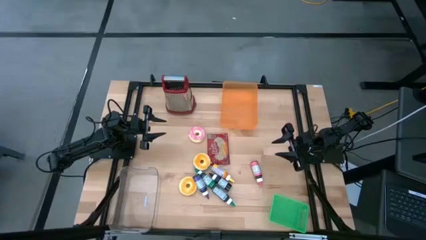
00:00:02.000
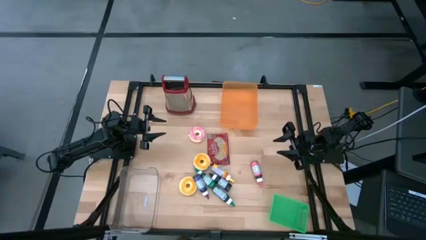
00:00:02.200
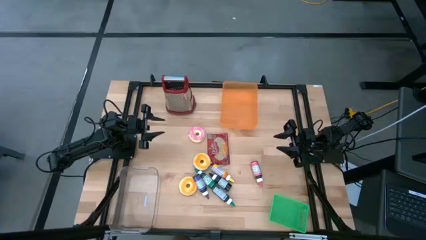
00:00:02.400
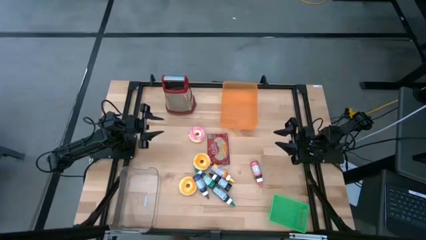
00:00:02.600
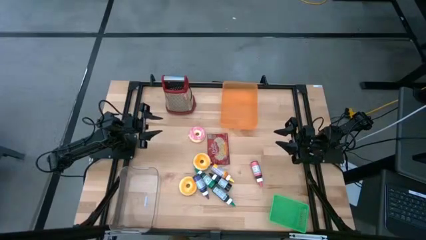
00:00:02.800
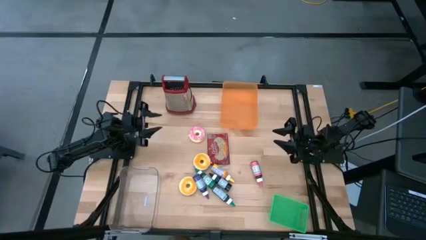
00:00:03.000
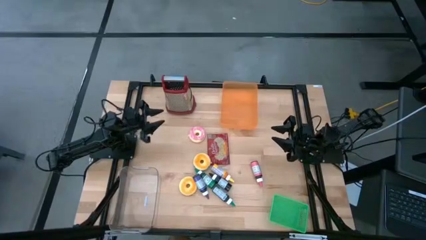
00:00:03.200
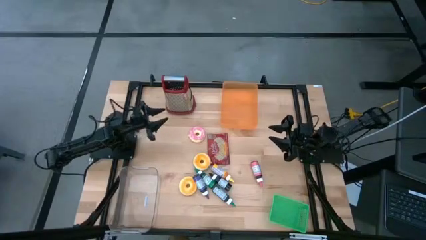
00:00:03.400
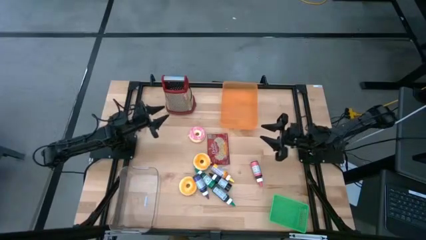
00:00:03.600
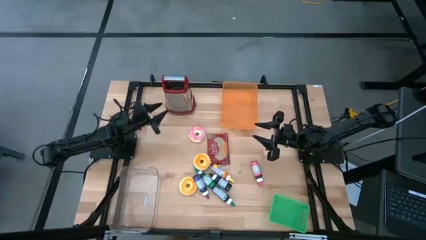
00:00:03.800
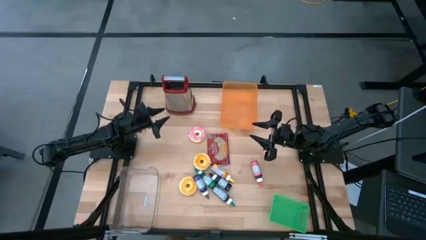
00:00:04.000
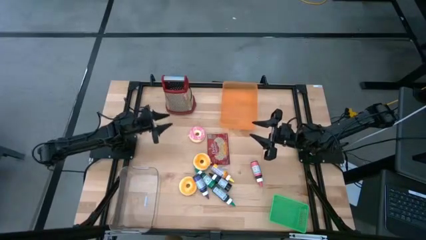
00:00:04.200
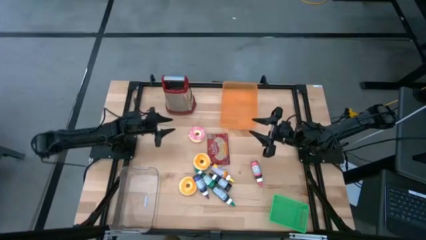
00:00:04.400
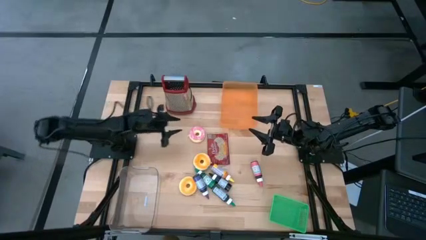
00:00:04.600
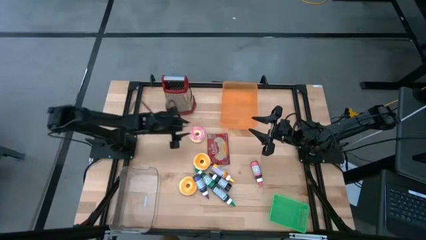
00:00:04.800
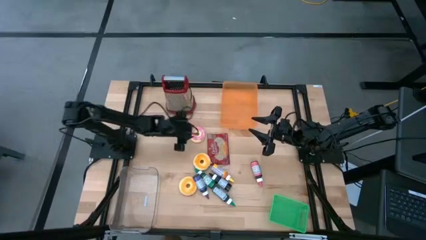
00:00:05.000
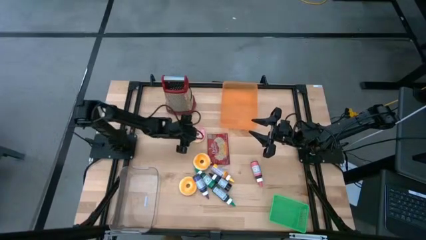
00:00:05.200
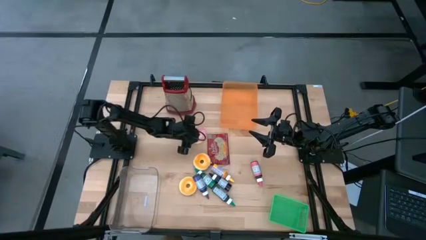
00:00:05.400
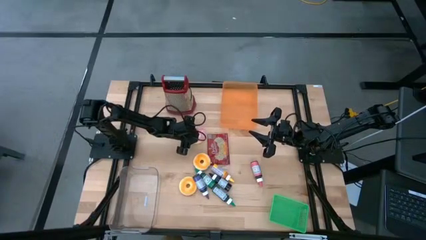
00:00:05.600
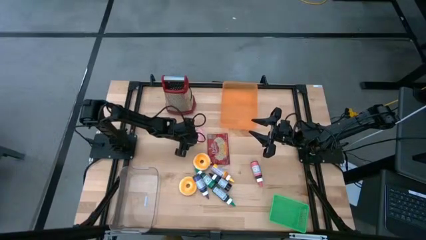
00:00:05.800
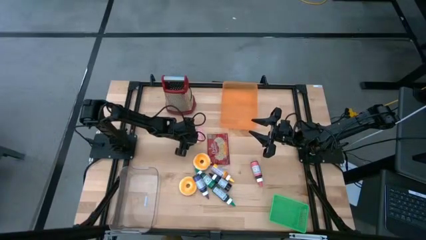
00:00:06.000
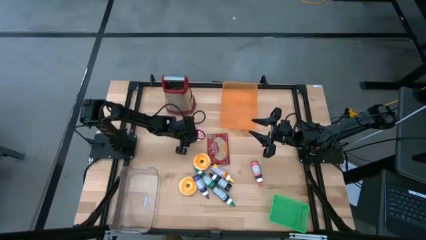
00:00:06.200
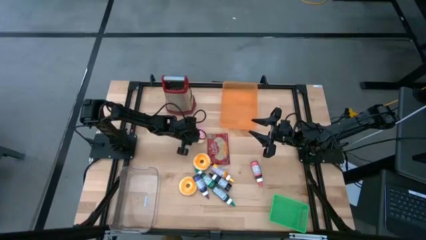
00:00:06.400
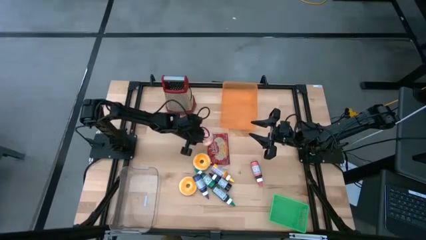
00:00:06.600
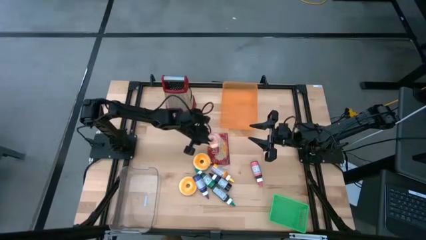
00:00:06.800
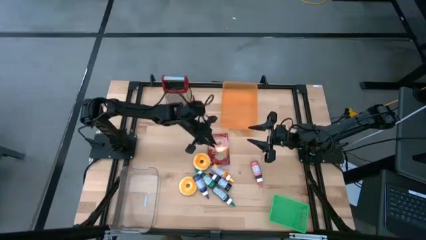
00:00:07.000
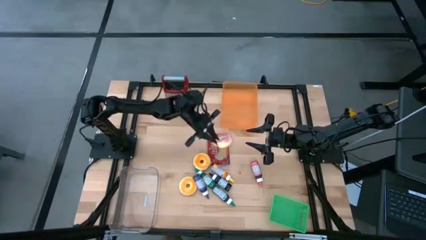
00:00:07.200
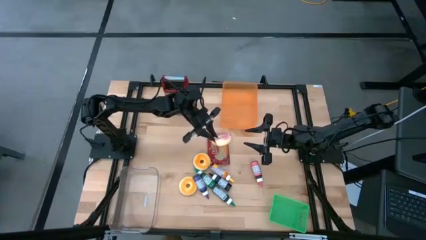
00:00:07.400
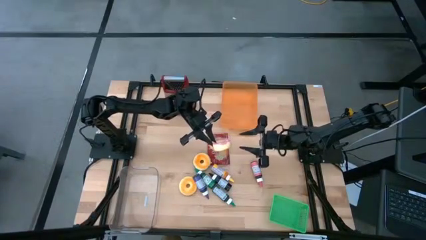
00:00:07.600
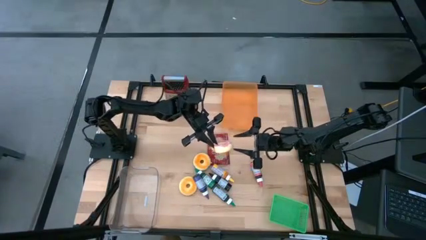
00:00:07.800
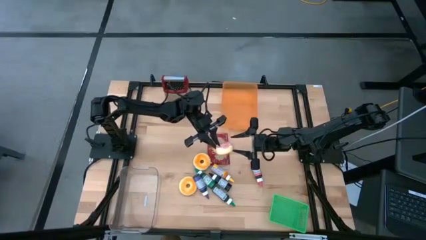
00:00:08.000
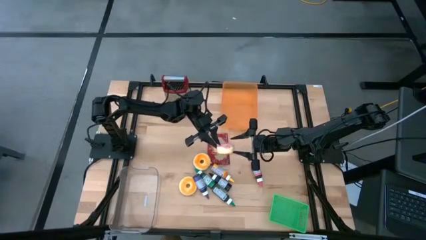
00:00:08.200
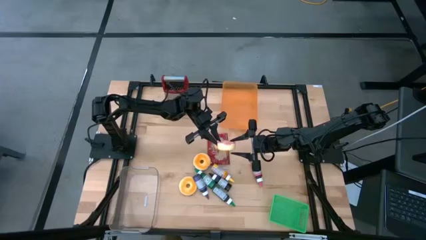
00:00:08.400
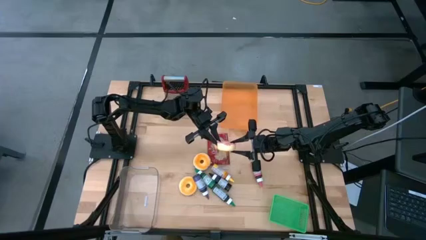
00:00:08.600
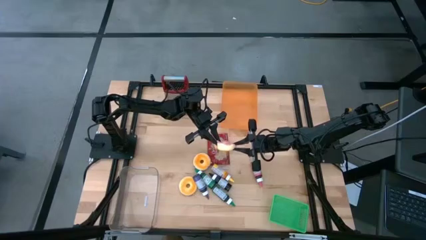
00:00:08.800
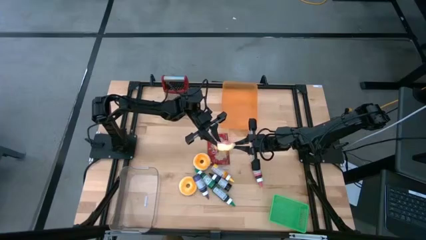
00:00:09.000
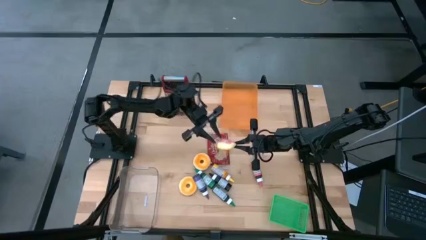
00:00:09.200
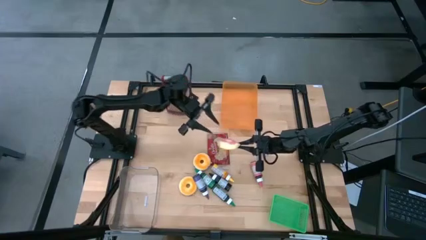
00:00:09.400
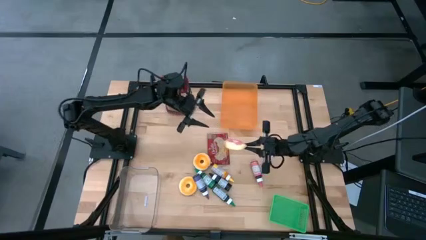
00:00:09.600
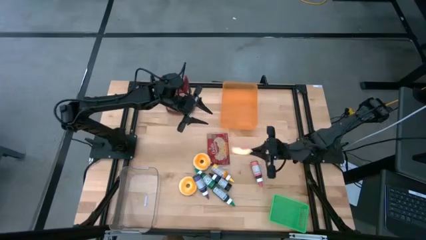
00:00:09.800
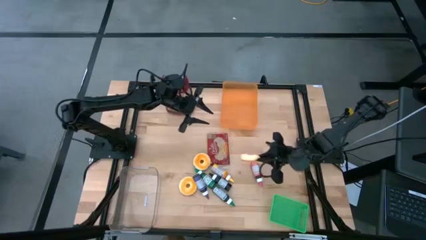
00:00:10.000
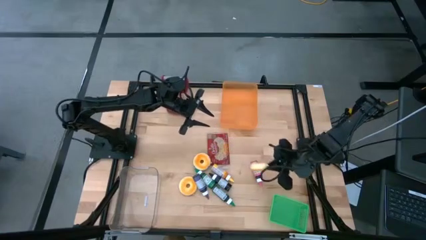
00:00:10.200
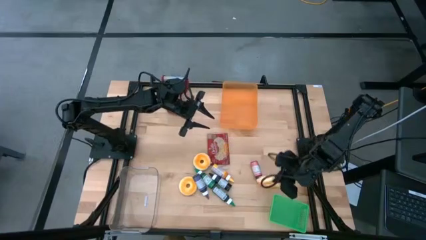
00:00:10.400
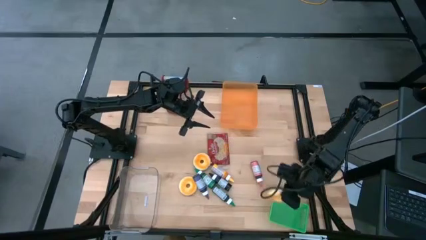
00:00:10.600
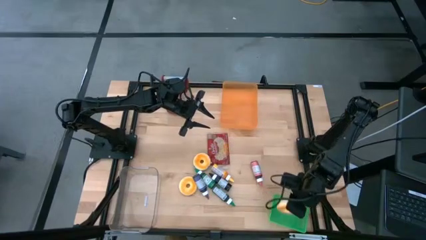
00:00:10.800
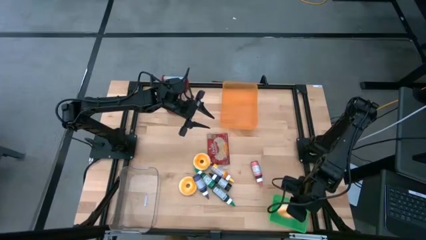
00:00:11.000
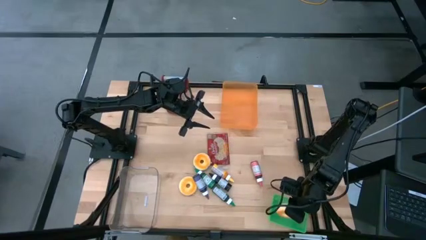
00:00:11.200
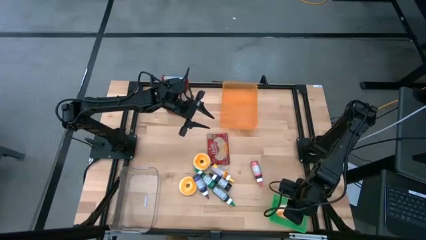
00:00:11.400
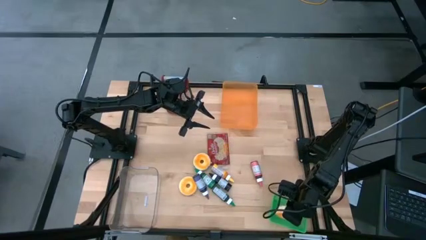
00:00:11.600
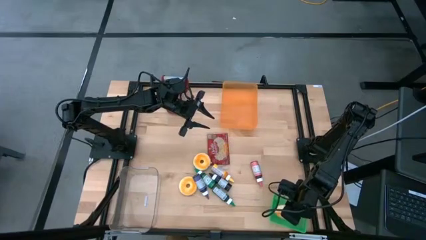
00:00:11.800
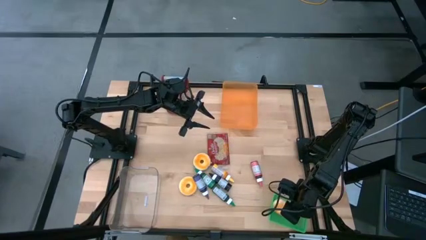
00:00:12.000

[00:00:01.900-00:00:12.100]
Put the pink donut into the green bin

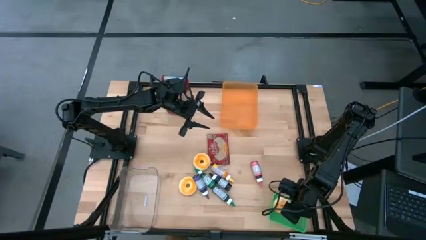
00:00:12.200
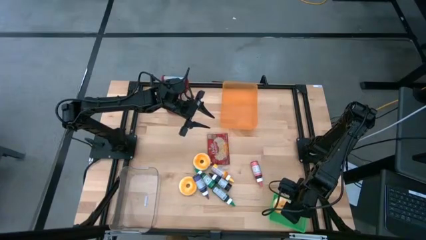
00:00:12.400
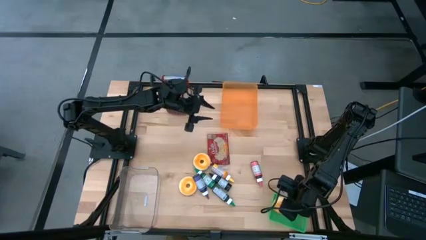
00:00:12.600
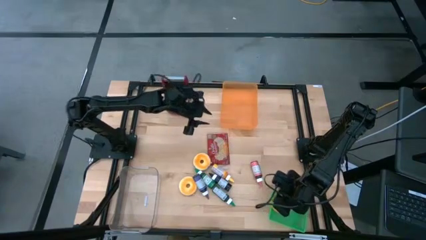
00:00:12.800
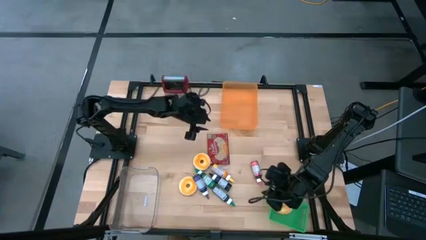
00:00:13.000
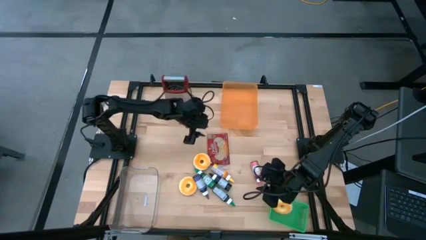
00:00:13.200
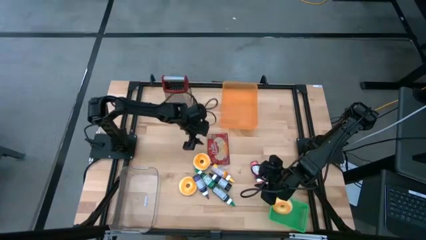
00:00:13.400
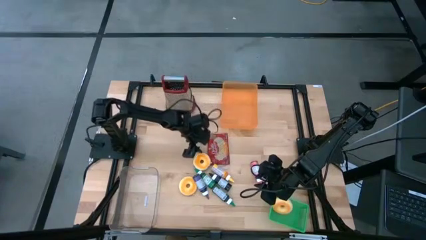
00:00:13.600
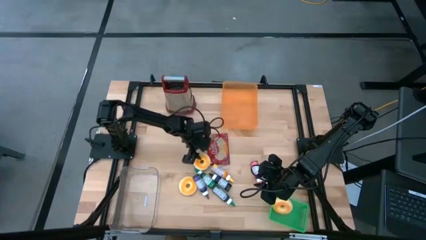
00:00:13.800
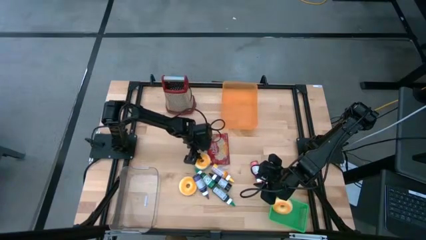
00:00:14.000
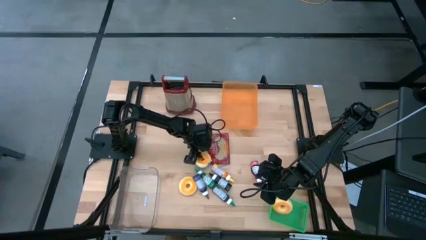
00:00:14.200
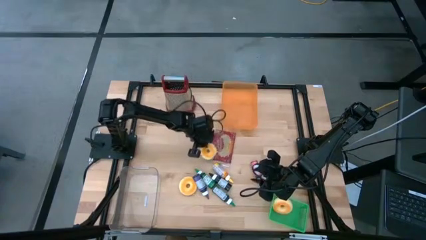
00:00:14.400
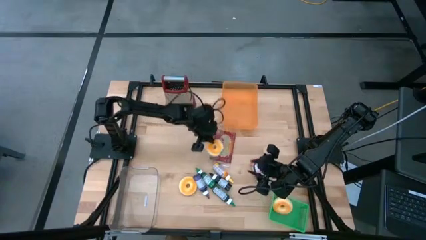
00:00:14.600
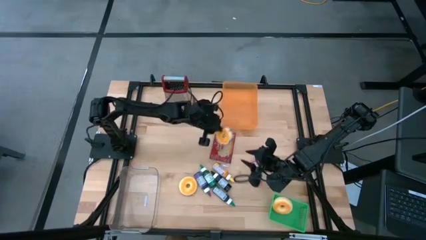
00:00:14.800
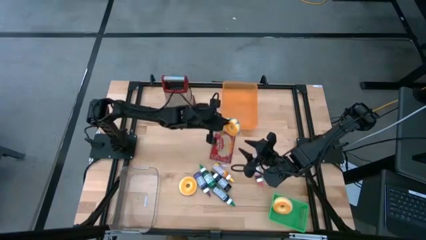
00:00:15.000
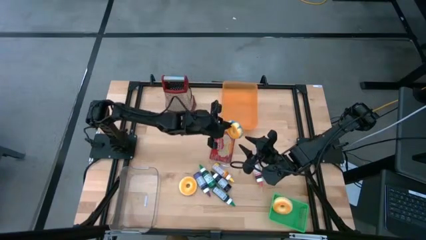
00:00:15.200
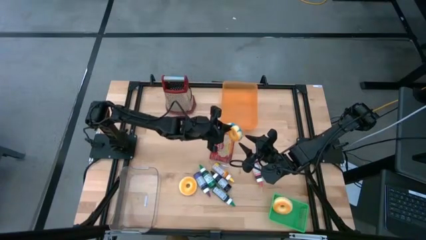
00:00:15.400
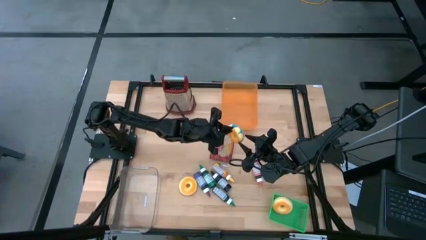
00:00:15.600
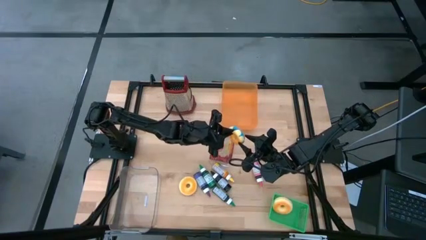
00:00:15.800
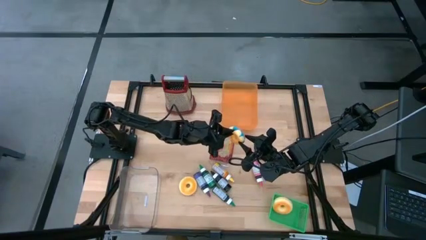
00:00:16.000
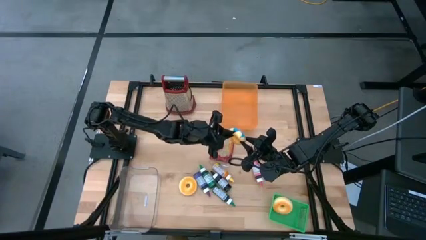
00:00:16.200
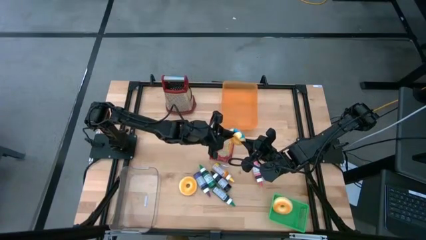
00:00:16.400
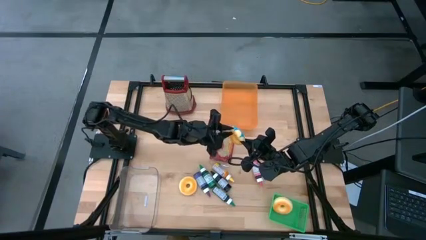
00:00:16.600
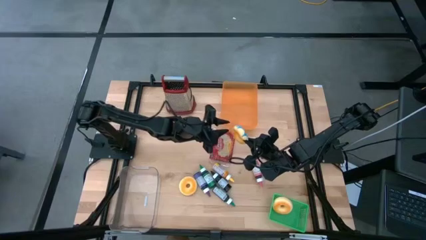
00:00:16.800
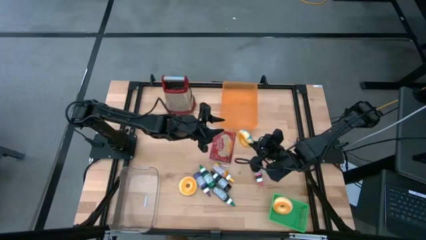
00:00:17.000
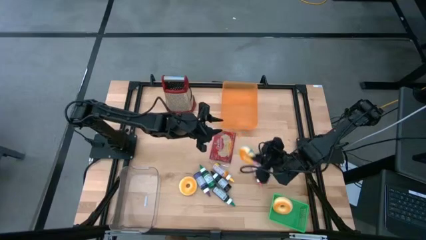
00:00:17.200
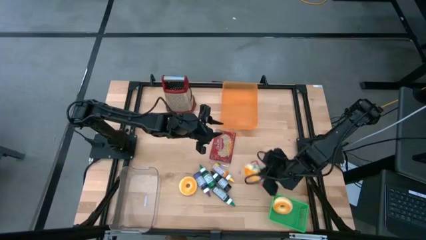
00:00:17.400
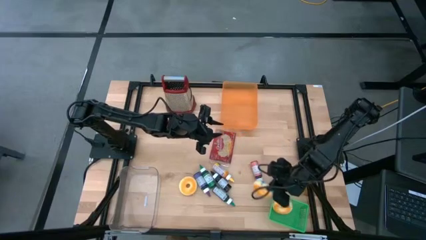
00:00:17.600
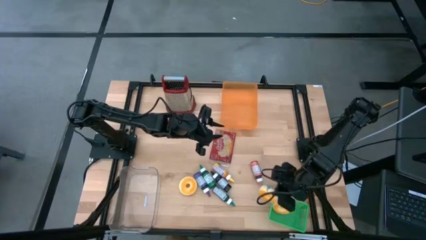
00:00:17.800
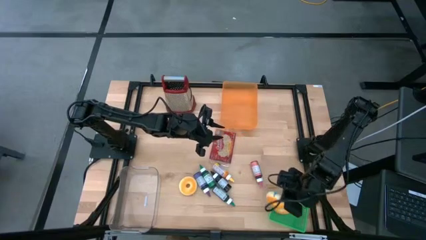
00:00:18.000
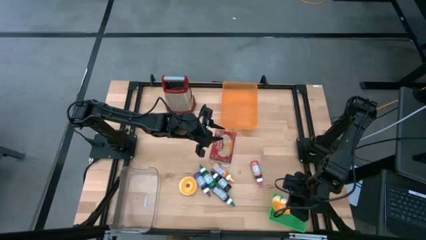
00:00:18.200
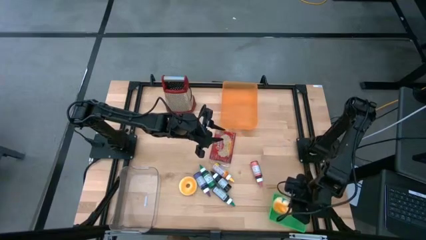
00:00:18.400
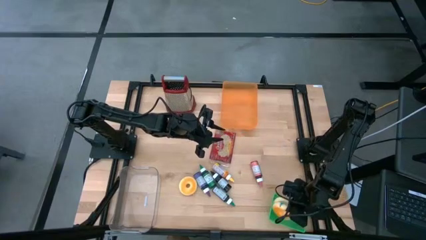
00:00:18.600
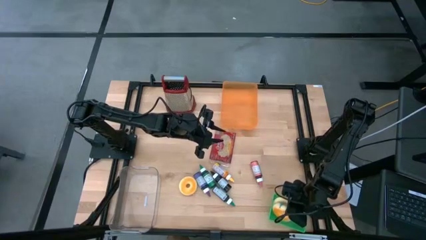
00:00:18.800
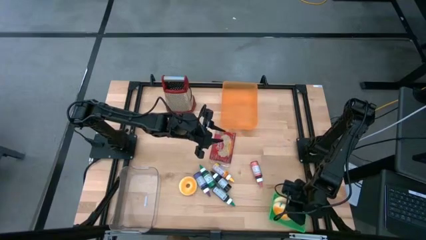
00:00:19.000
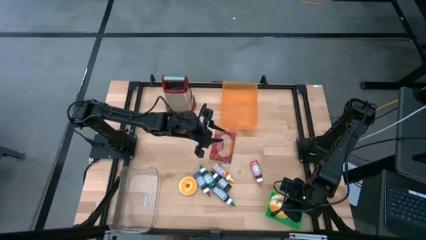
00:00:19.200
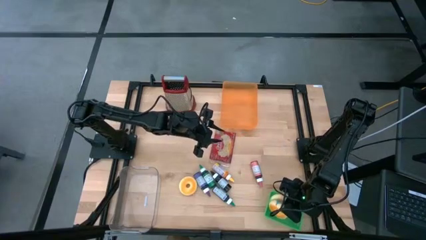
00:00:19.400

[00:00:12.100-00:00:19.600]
Put the blue donut into the green bin
